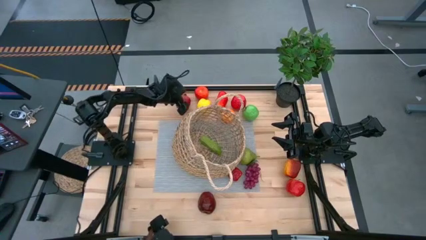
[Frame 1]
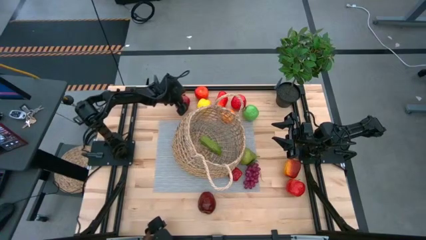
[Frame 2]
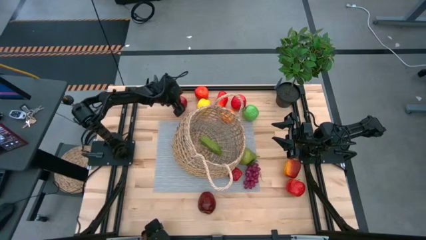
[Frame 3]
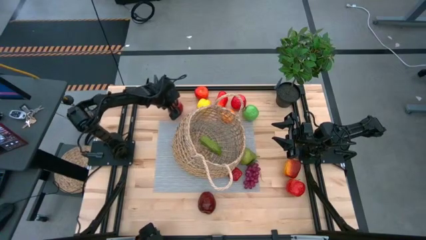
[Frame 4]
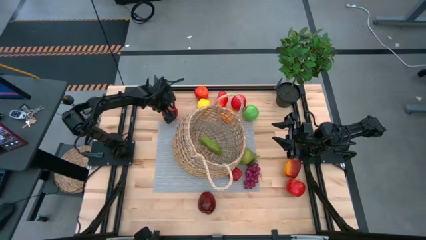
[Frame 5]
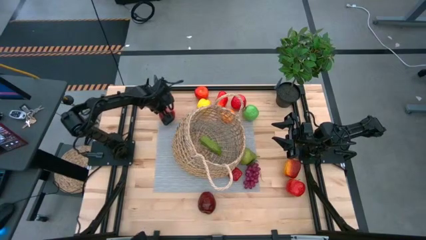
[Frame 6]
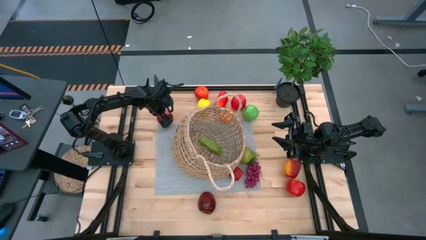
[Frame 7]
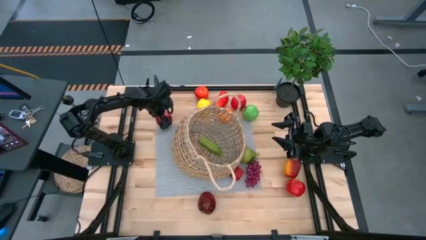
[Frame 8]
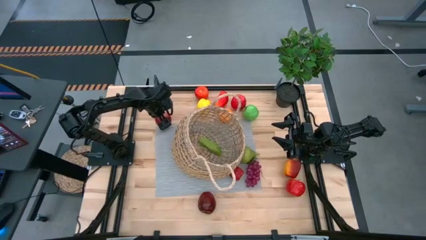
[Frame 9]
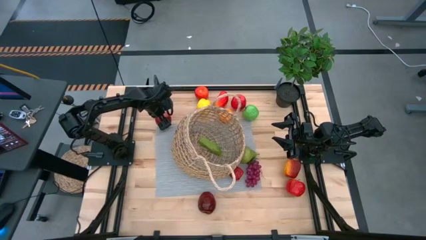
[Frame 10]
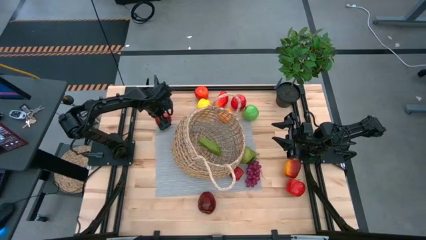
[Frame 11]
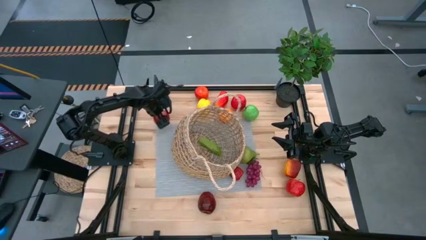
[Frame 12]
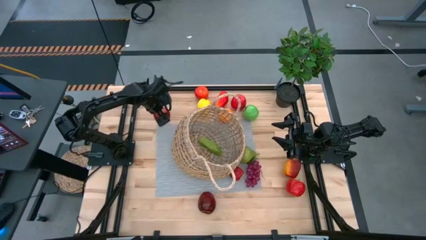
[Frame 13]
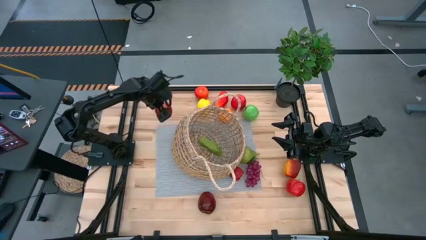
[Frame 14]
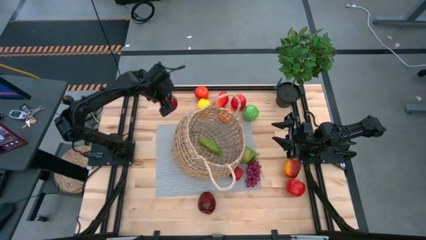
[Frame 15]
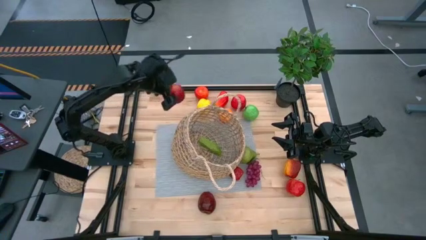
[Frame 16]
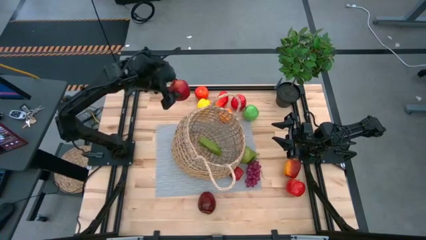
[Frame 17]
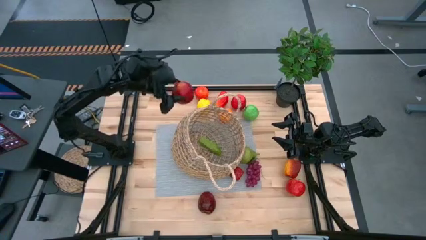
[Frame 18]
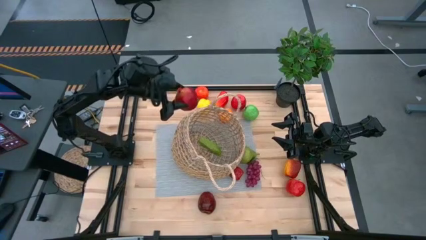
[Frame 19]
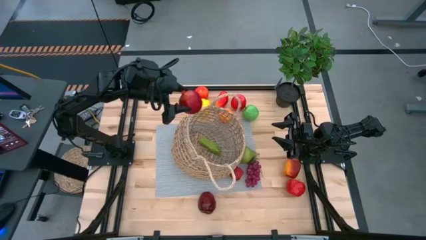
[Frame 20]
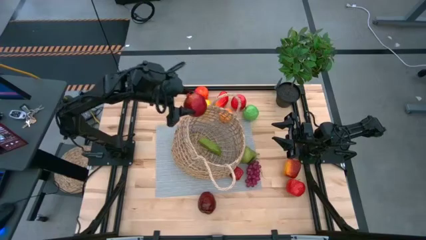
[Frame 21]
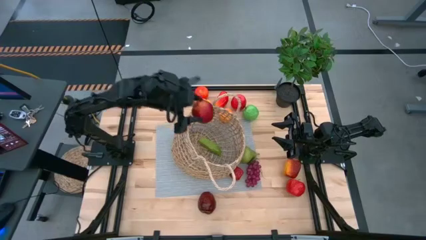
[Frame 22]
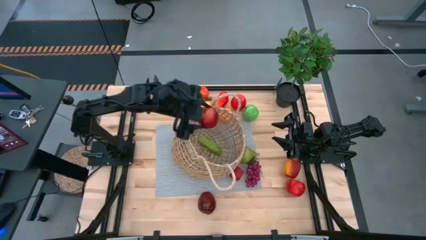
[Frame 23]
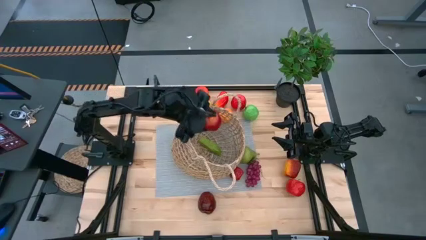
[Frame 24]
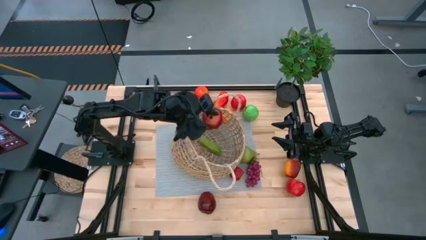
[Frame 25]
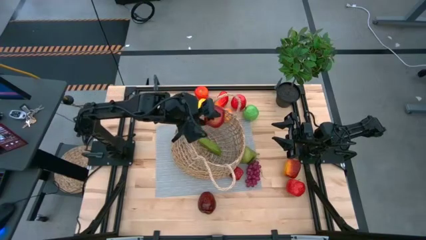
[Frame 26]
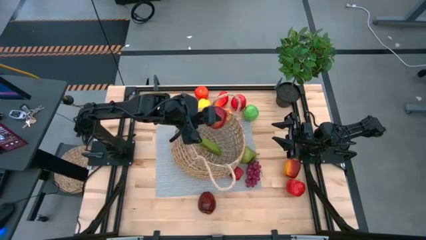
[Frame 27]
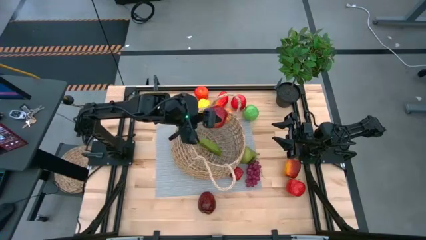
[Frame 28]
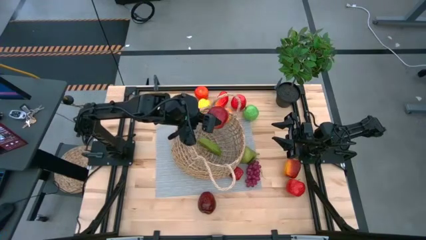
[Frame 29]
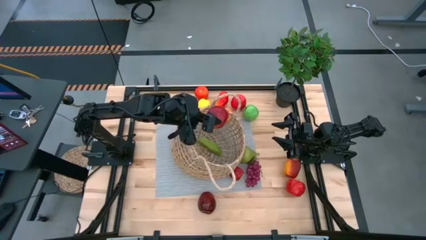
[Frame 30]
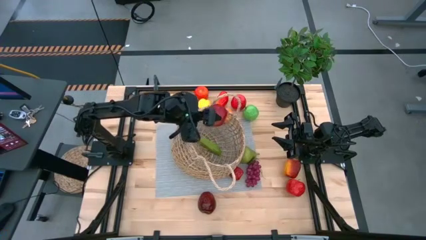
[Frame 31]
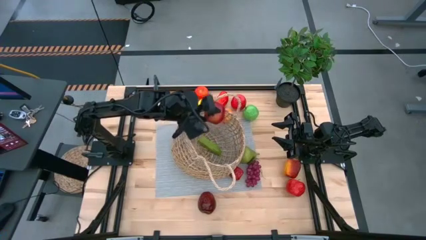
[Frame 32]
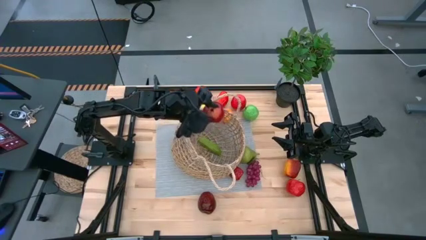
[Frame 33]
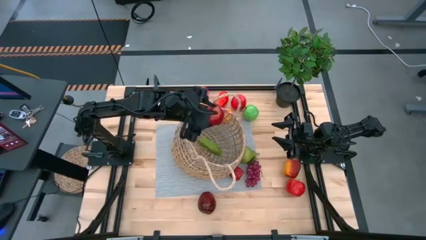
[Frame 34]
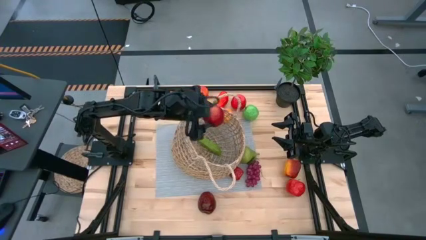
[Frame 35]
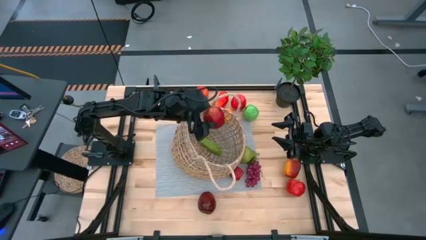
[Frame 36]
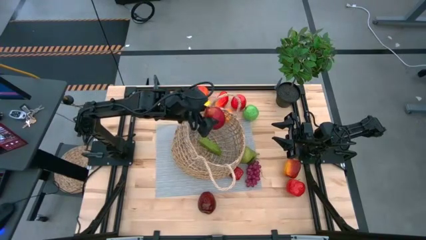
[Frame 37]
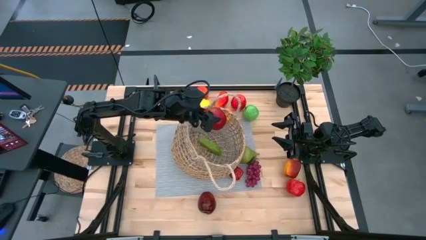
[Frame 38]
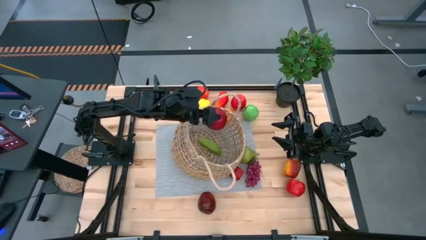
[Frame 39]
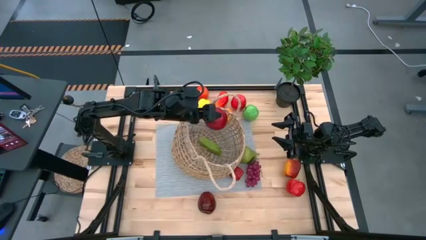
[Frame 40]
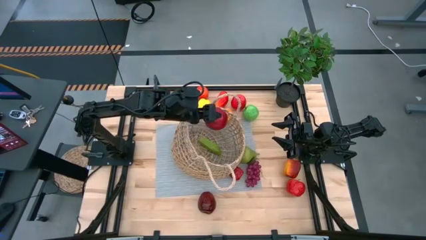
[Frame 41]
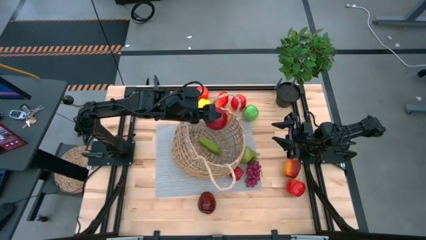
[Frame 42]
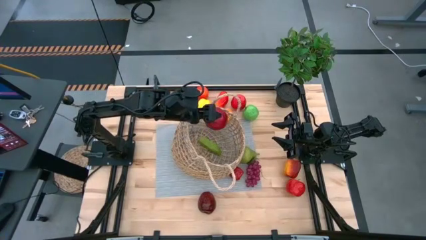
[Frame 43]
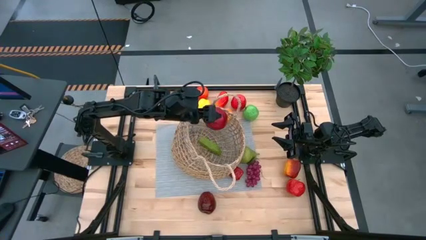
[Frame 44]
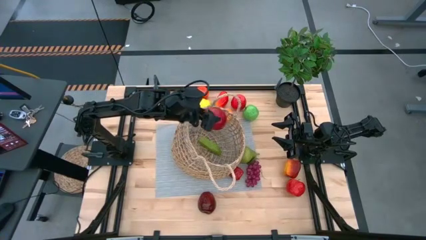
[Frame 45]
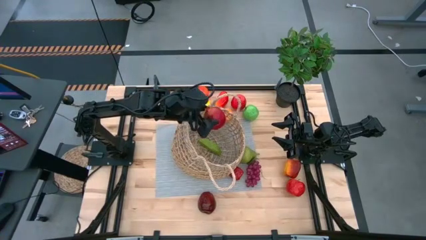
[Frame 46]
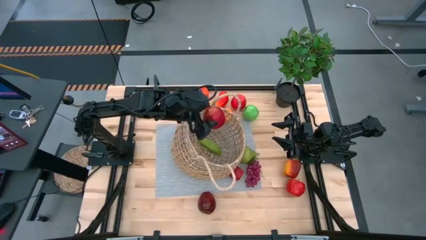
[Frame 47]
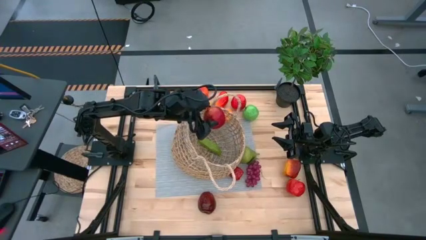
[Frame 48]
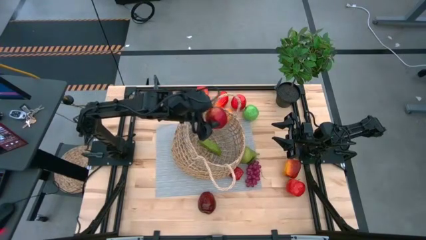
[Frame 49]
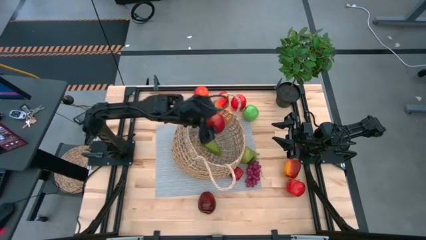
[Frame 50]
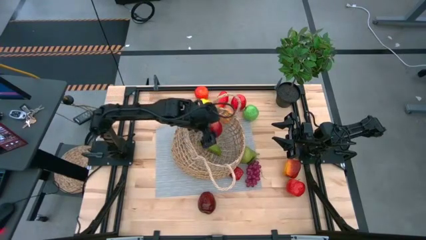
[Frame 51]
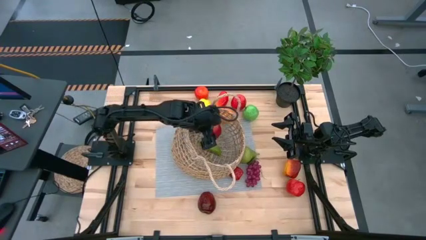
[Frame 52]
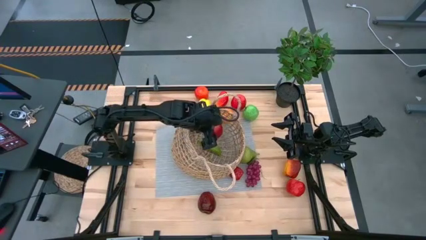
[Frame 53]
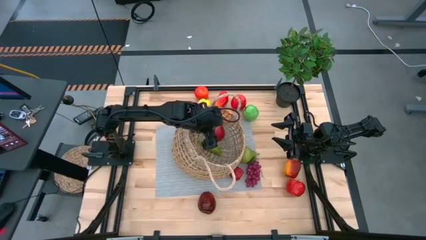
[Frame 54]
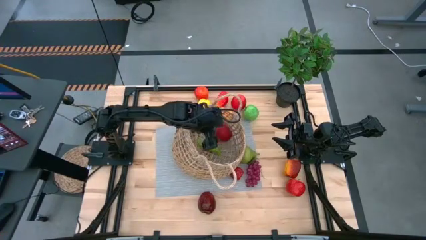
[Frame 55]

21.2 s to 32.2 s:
Task: Build produce basket
Put the pomegranate into the mesh basket

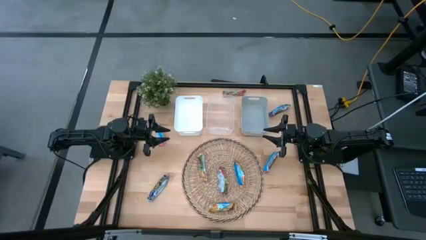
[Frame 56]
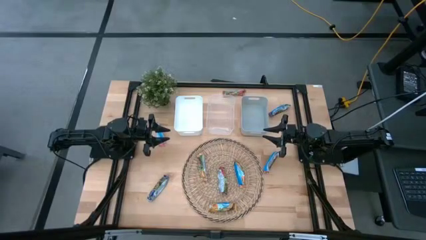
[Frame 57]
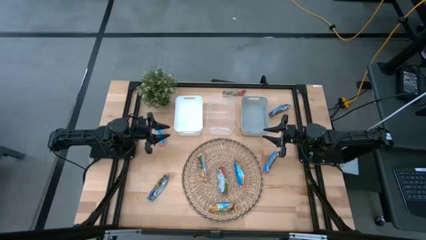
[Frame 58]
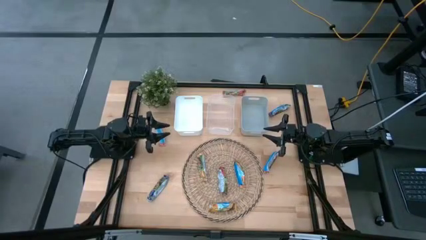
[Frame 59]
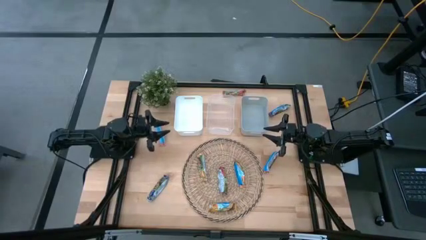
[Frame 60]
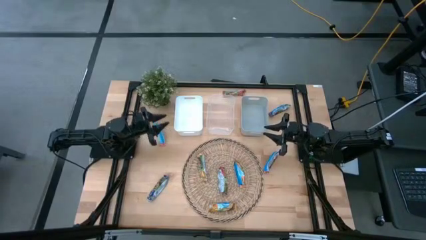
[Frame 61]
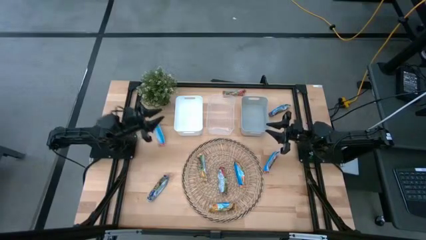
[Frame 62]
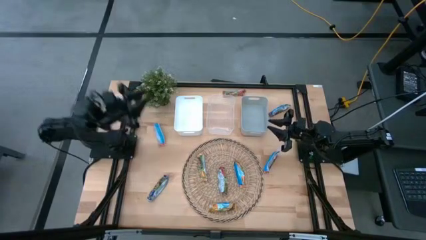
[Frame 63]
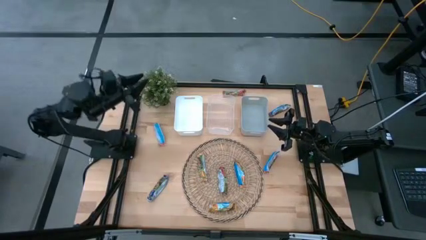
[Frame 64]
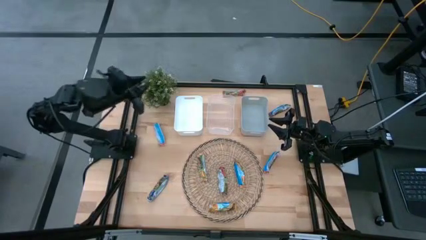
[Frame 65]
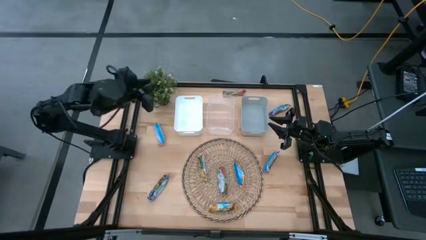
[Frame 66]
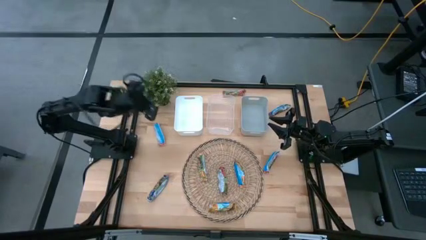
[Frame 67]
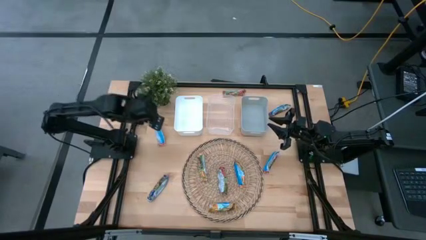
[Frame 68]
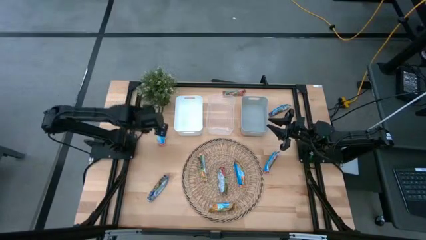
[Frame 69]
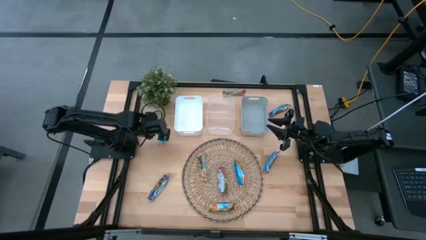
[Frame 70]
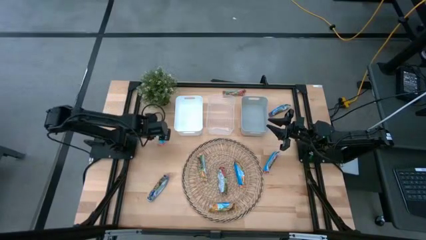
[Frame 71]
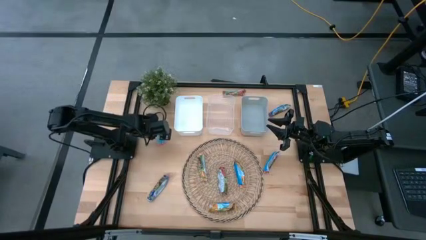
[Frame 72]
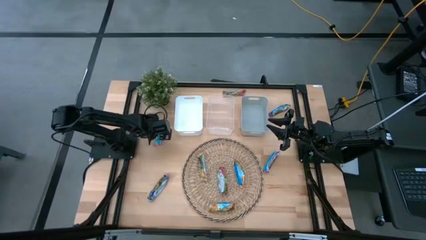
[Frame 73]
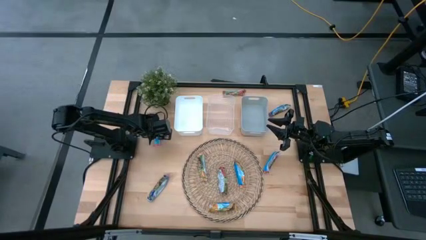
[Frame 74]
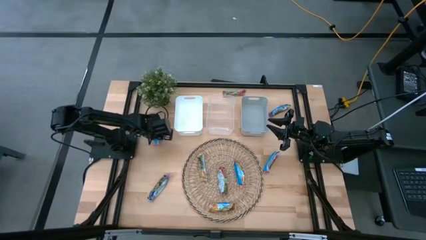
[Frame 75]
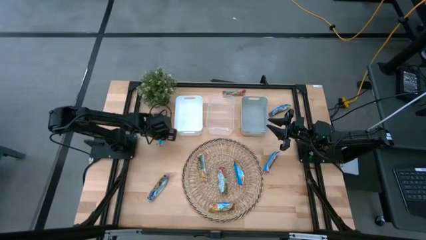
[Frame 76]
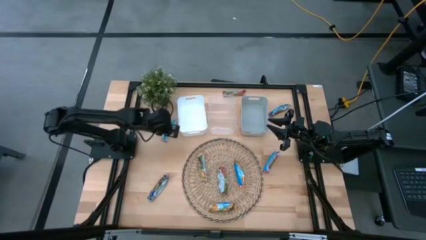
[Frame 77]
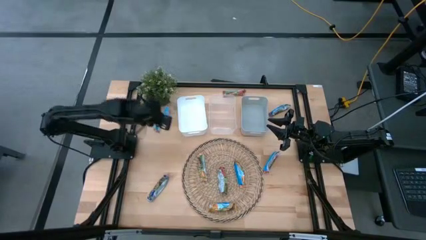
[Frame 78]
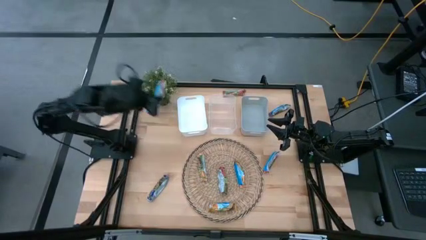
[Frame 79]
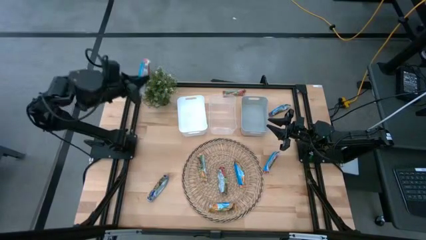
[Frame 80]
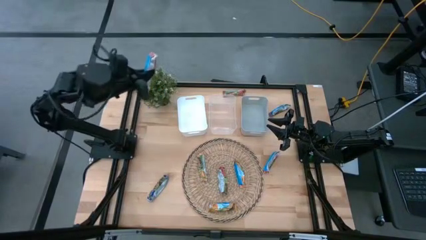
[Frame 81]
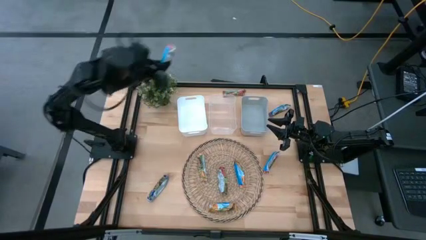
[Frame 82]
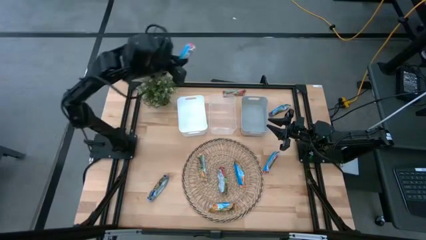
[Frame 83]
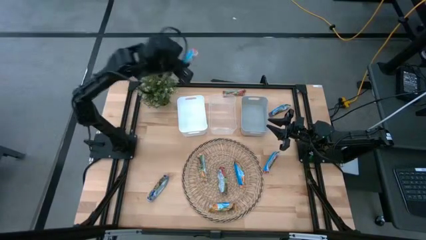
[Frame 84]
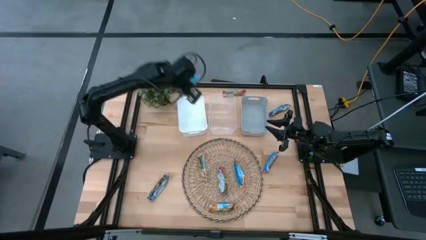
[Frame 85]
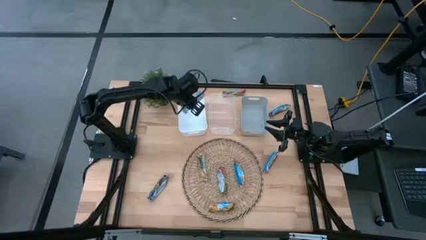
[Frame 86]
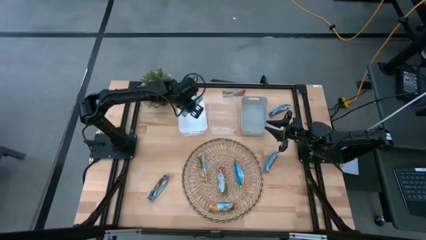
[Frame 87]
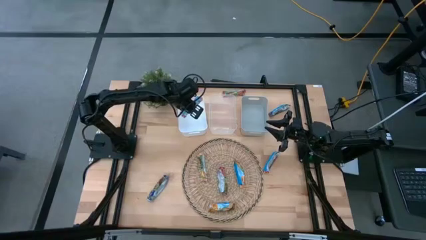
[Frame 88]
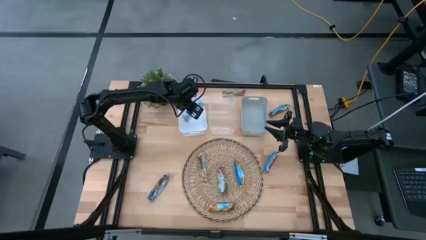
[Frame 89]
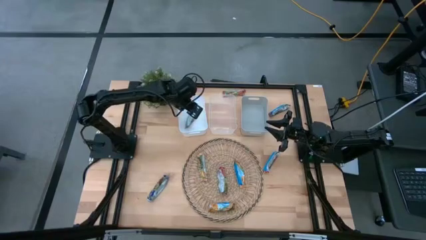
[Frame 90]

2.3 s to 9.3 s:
Task: Pick and place Granola Bars by type
Put the top left red granola bar into the white bin
